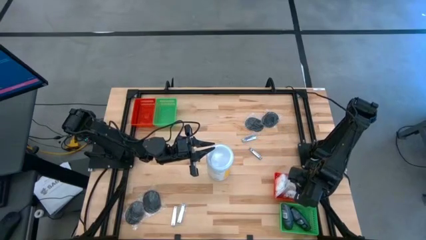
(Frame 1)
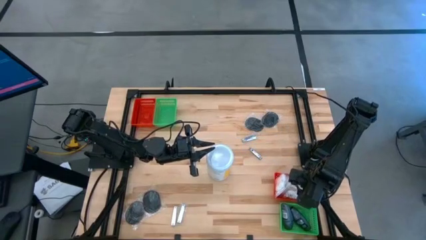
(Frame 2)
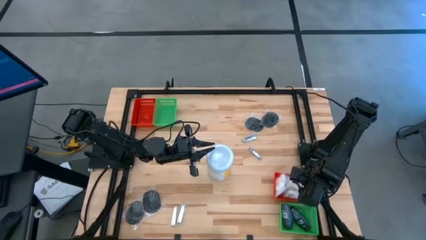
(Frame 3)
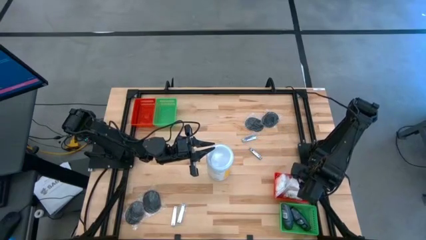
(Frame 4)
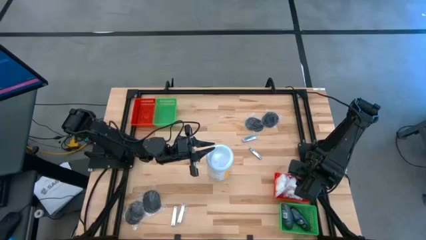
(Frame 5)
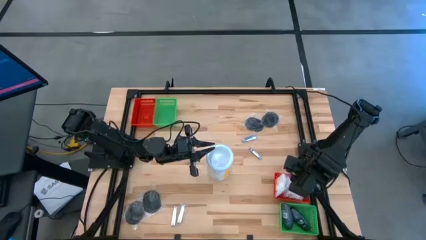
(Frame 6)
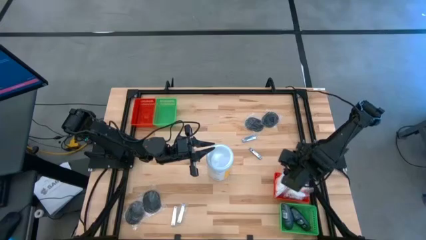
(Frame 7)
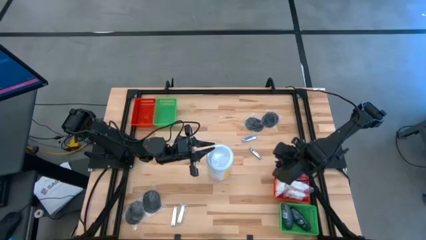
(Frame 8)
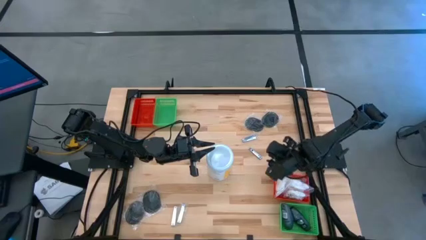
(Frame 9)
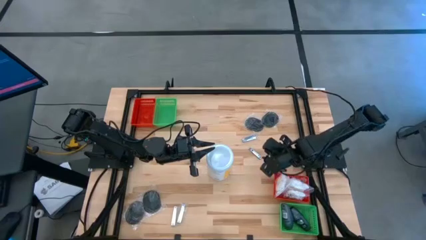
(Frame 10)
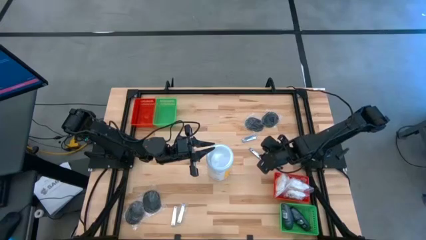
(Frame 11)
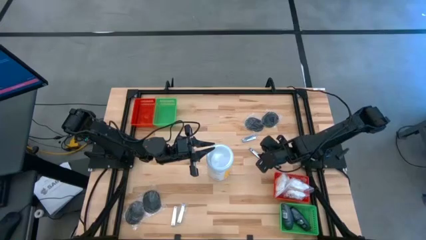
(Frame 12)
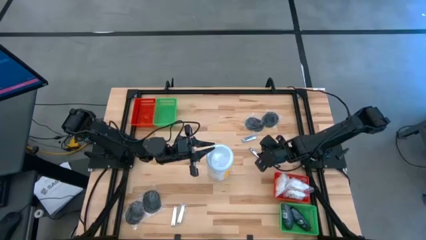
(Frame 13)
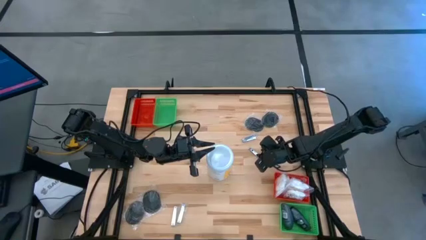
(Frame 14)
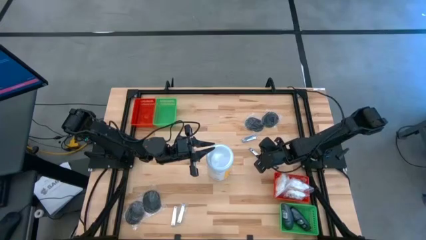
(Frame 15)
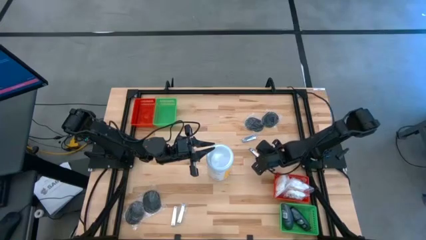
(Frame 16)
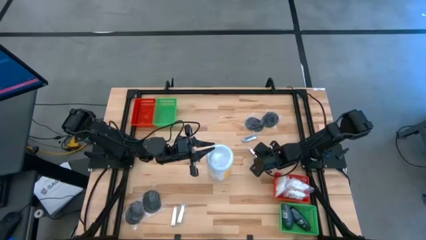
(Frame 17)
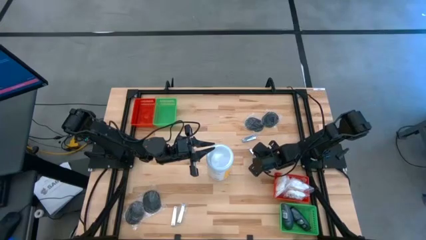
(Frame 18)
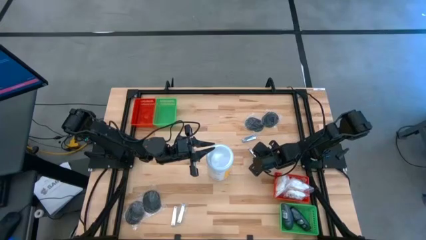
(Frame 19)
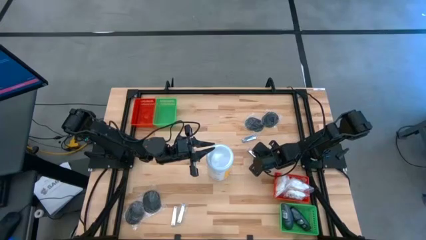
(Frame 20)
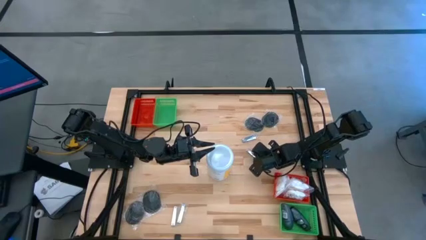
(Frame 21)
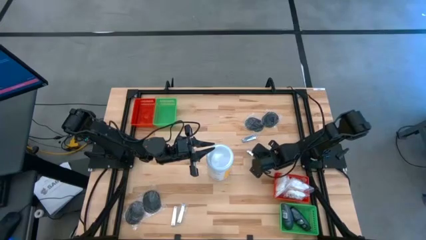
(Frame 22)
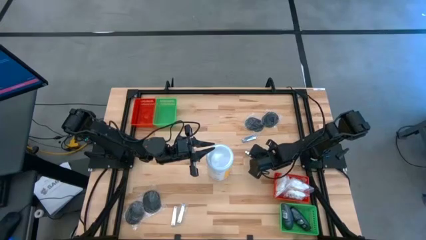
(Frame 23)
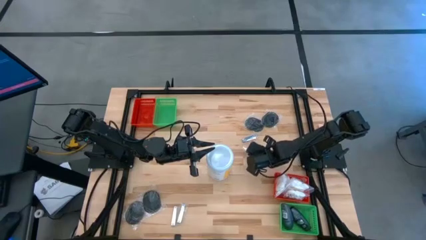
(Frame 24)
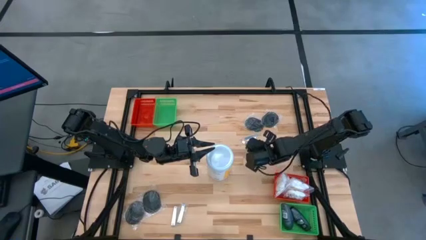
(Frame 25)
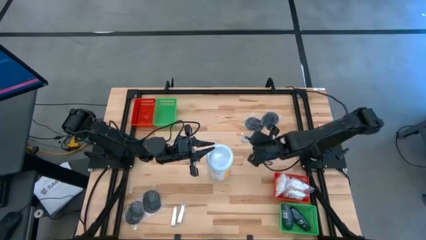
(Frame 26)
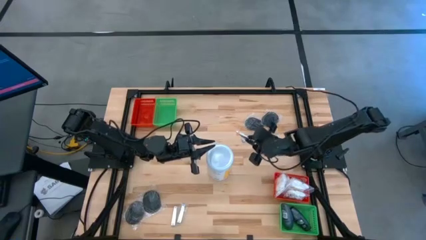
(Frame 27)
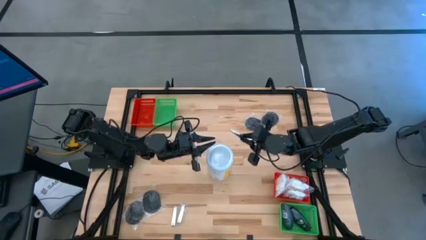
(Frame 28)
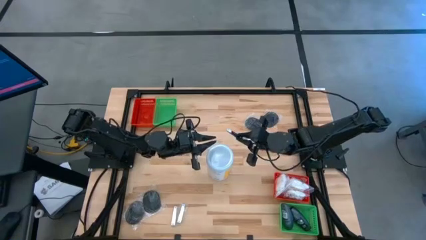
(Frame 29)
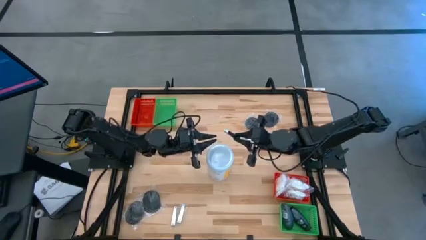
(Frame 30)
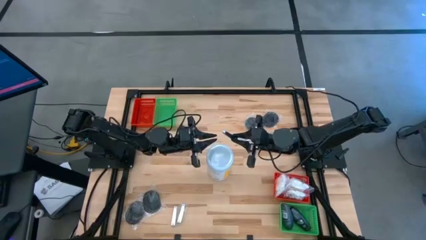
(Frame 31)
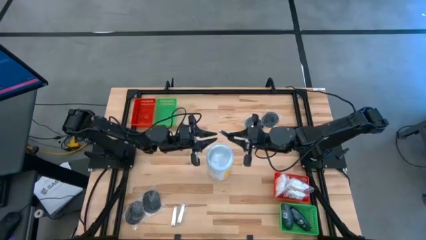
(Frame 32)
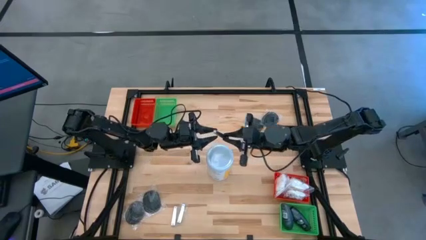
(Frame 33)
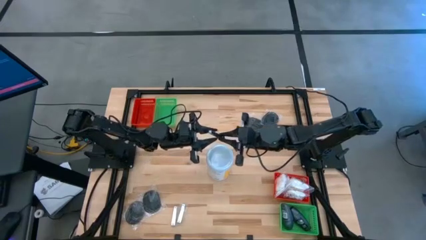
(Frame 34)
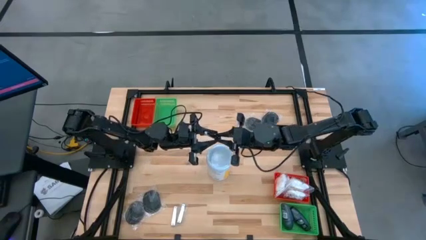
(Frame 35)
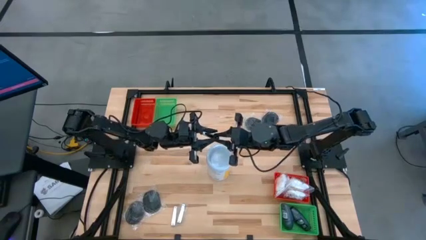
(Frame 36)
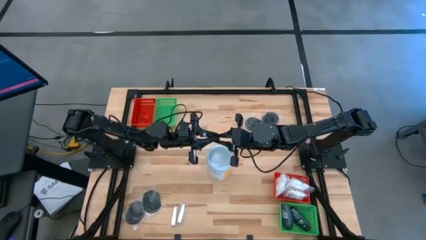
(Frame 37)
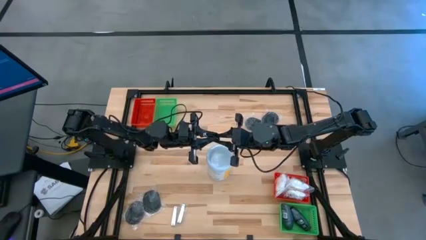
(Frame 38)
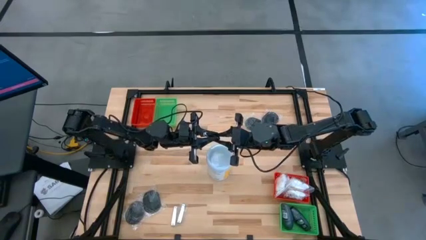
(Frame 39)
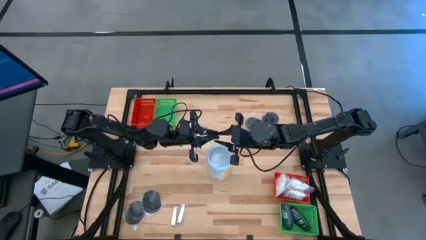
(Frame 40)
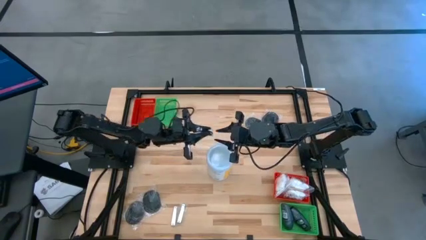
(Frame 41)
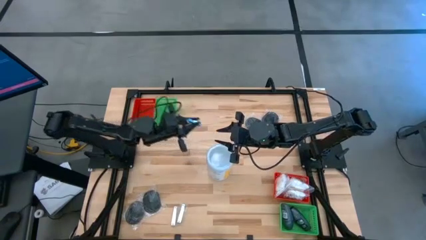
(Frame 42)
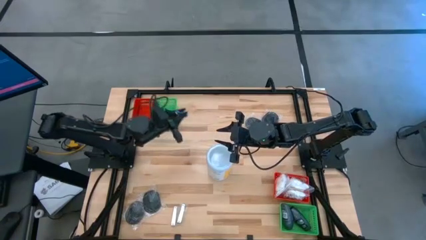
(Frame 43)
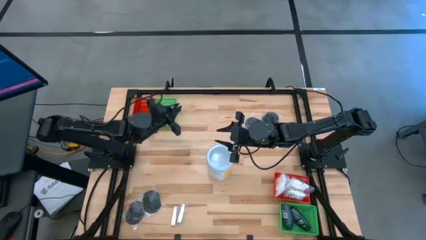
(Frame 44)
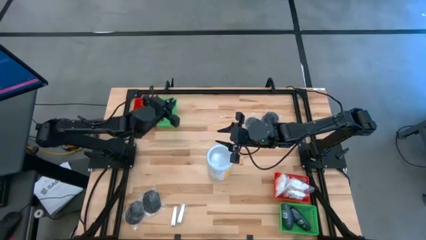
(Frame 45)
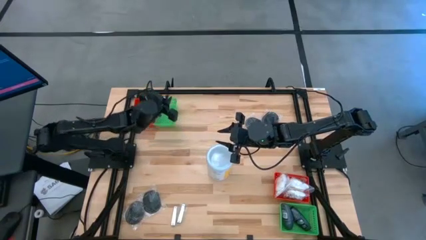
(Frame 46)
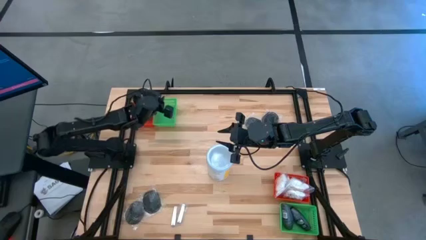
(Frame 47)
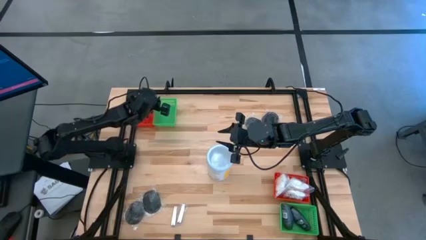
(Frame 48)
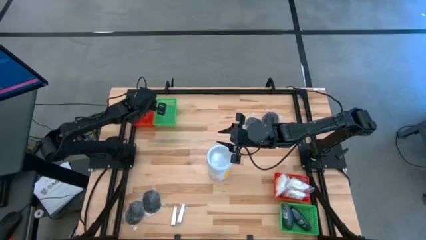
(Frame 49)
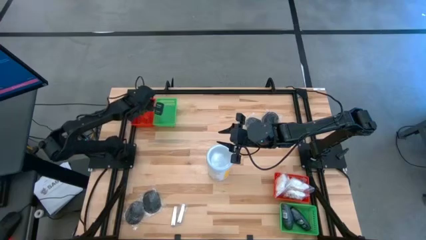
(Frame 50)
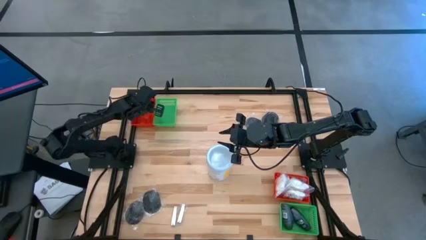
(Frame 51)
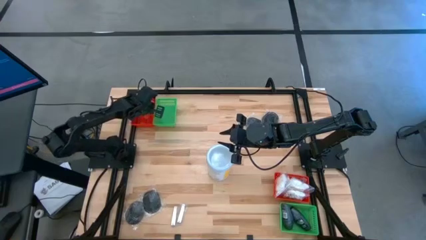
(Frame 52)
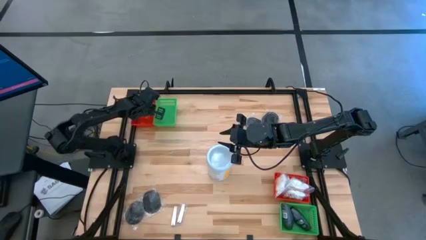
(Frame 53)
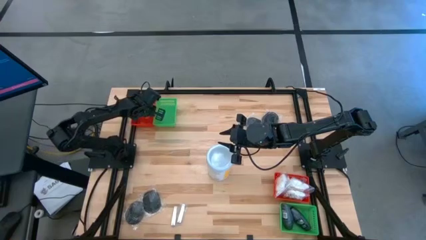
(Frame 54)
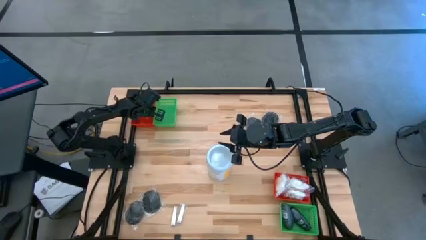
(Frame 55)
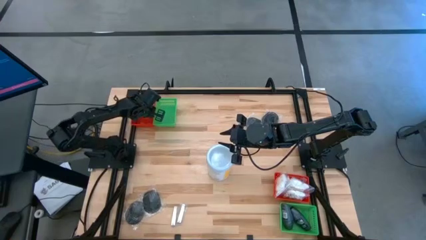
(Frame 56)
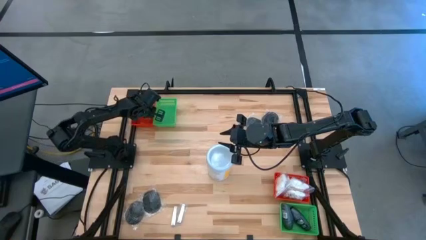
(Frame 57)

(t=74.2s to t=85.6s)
Task: Pick & Place Travel size toiletries
Put the silver nail clipper into the top red basket
